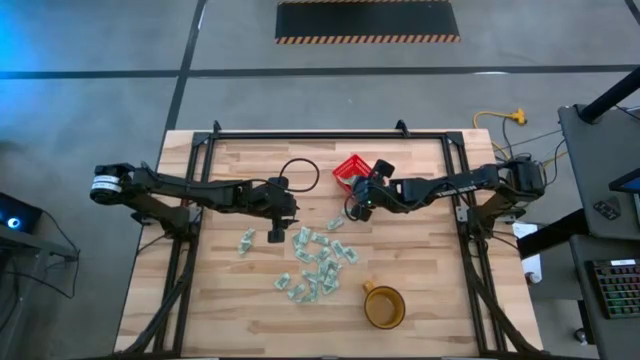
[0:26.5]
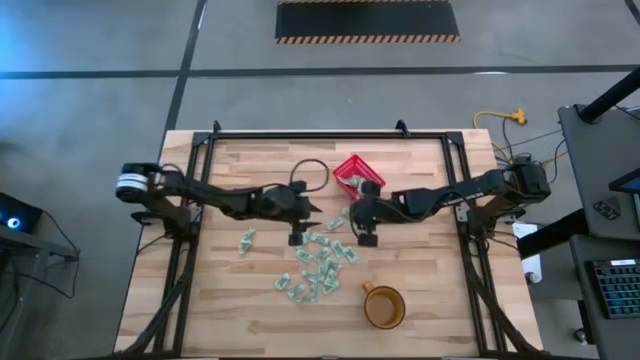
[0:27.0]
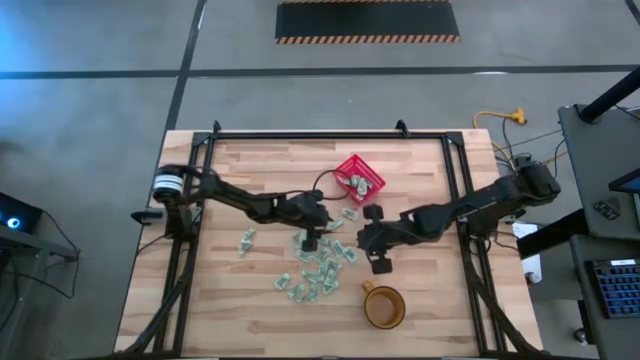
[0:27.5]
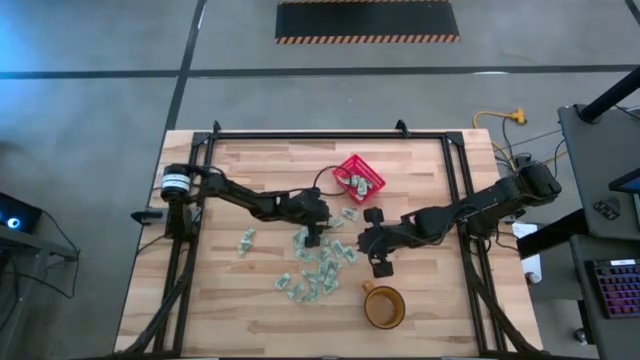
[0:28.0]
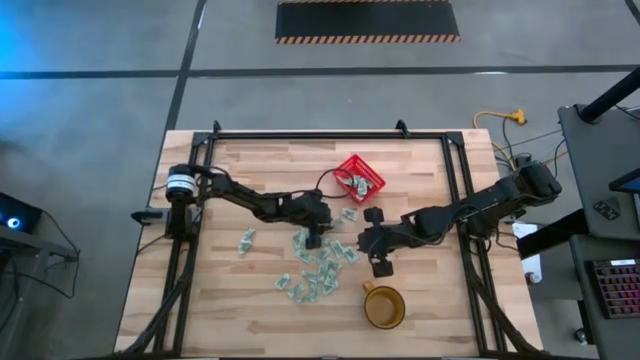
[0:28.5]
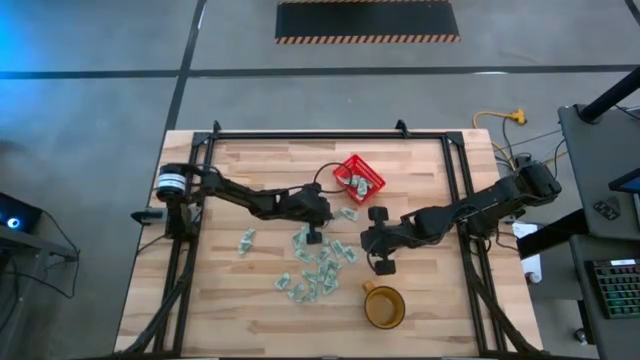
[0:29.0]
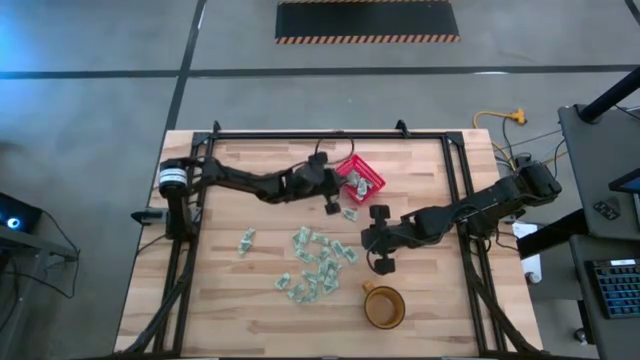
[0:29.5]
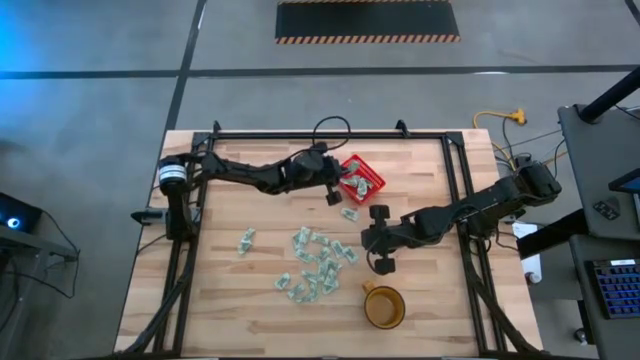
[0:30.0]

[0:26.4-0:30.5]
Task: Pick and place Stevia / Truvia into bins
Put the stevia packet into the red basket

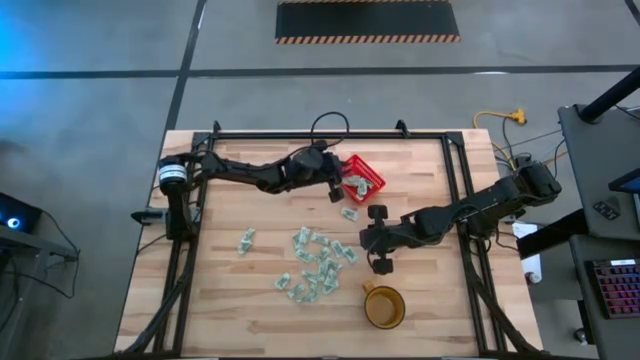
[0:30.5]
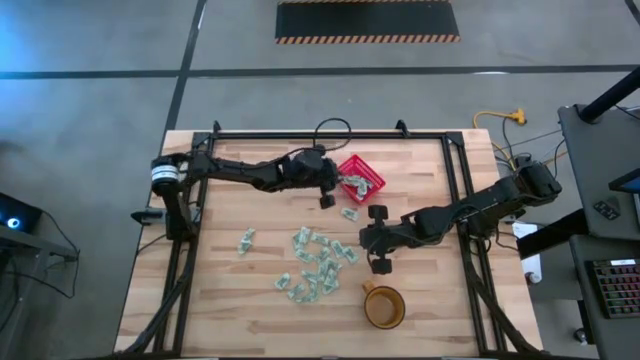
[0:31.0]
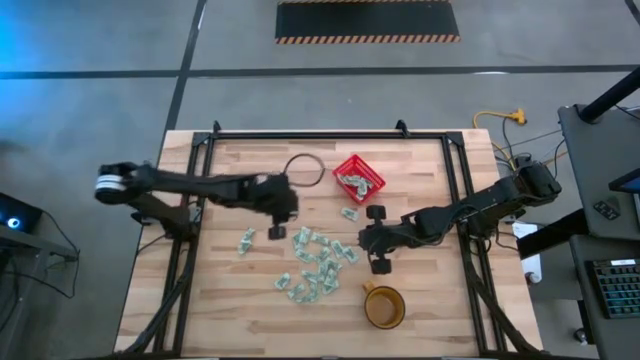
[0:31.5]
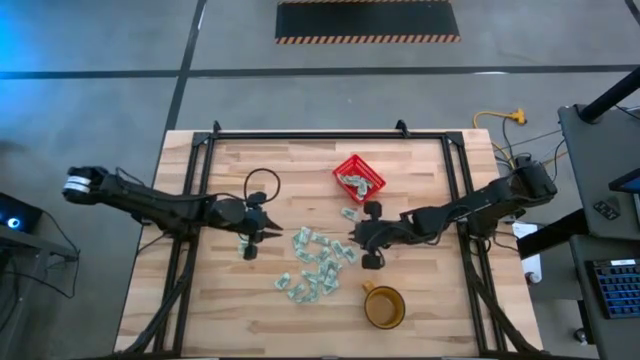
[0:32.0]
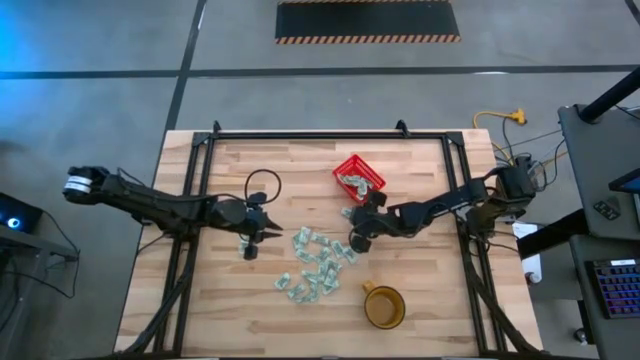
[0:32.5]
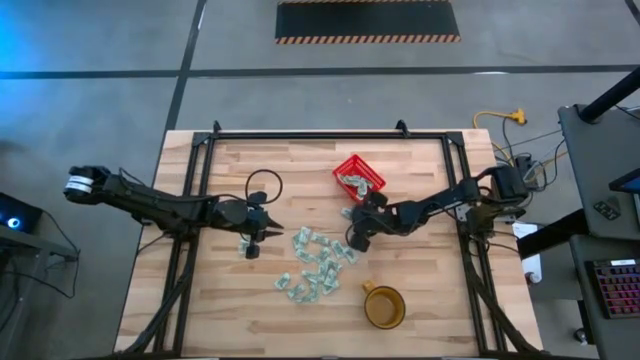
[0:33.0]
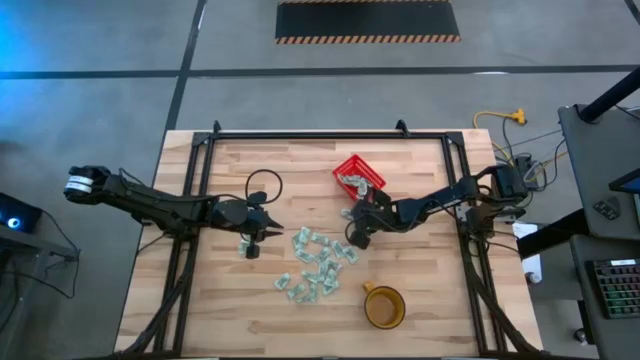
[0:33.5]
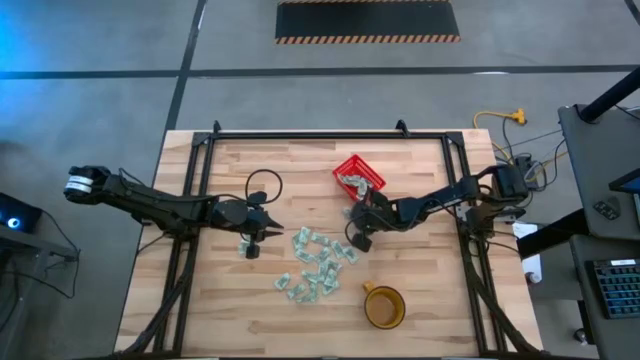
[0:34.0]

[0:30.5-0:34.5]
Put the stevia packet into the red basket

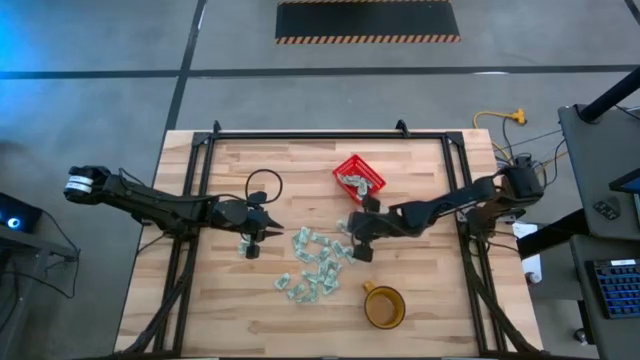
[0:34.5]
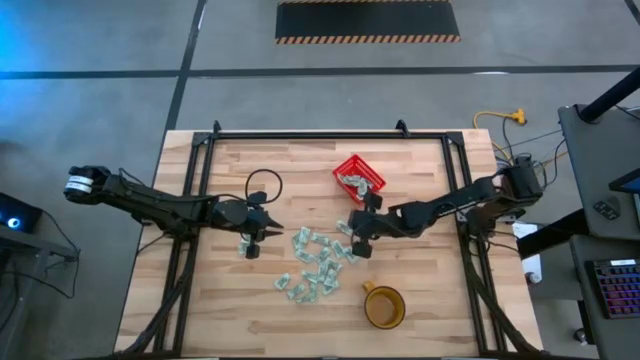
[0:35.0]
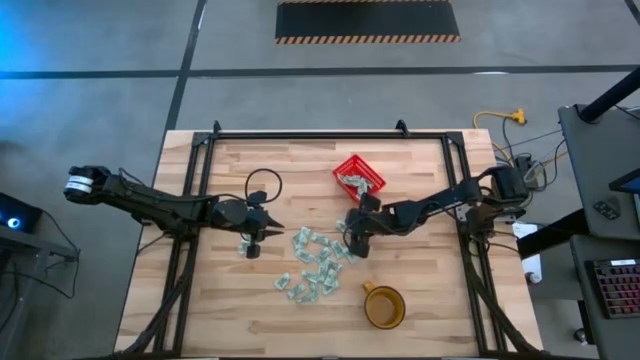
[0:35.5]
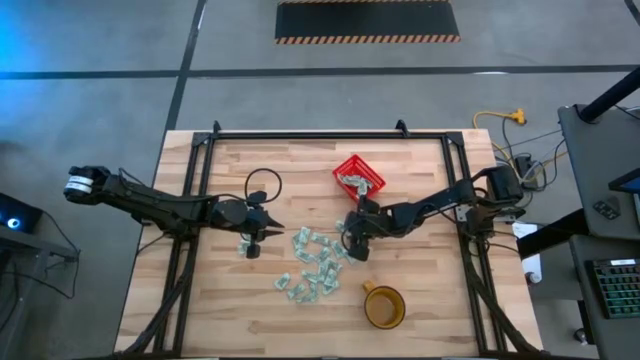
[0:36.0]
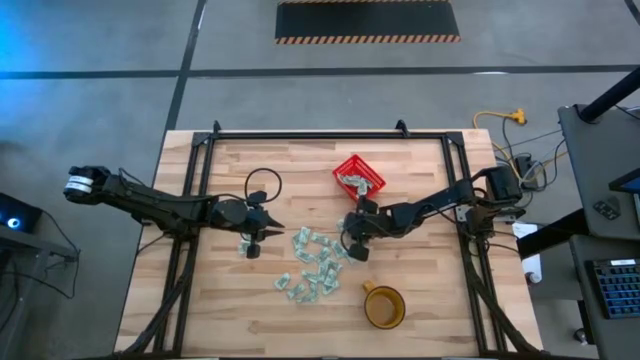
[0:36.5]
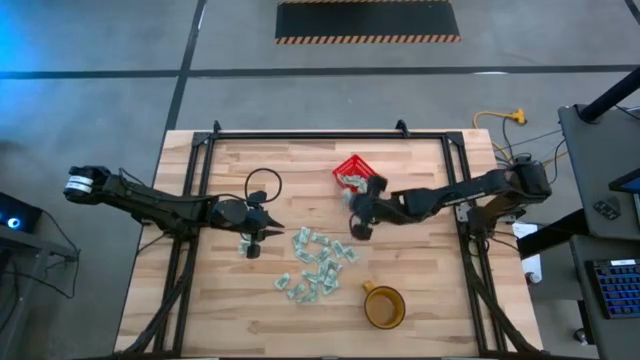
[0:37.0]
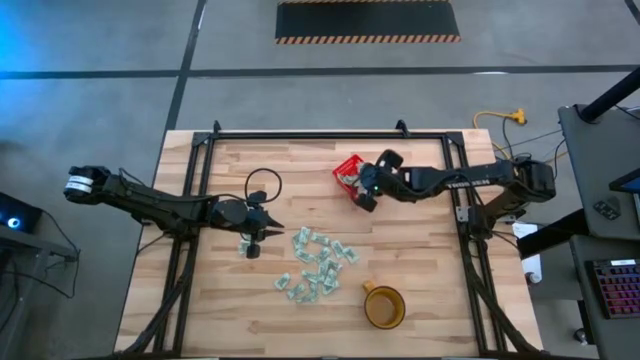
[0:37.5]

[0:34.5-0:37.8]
Put the stevia packet into the red basket

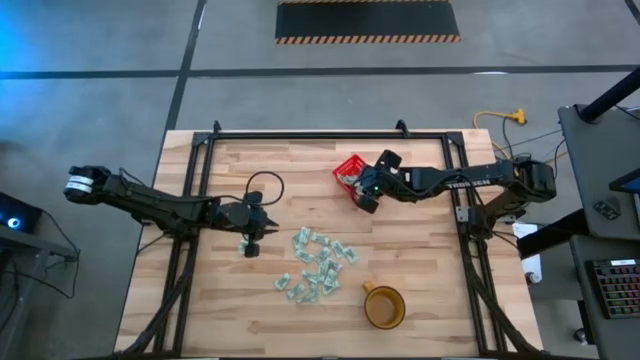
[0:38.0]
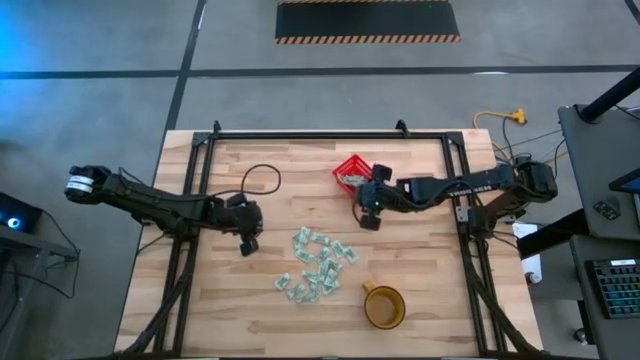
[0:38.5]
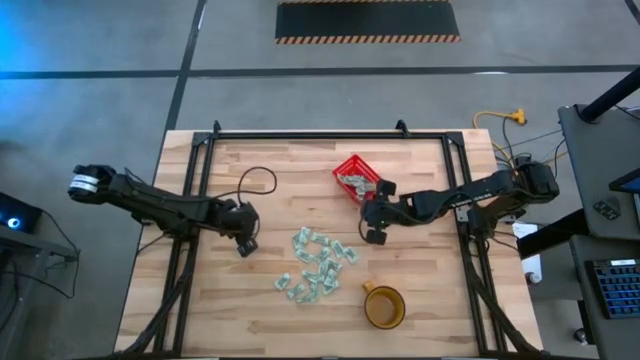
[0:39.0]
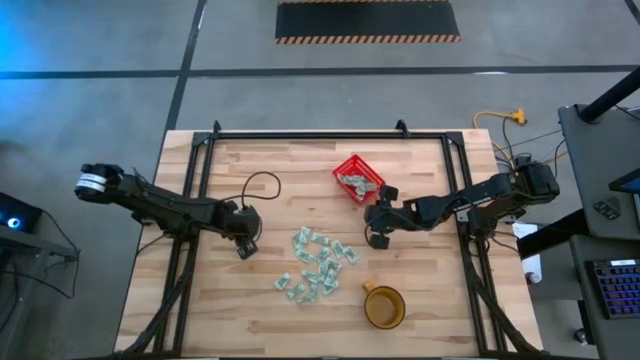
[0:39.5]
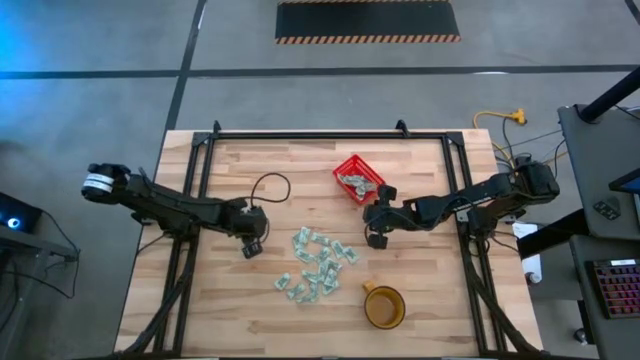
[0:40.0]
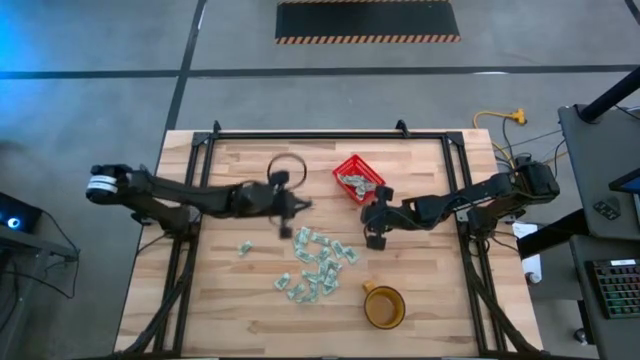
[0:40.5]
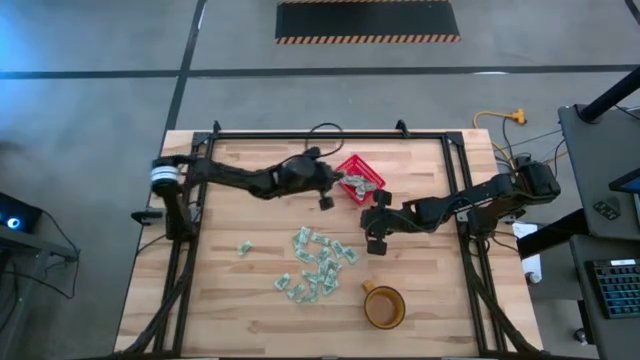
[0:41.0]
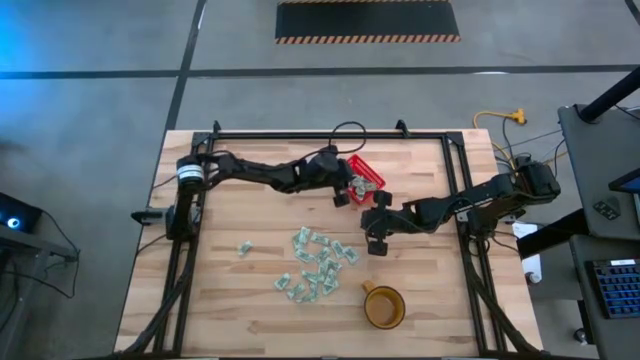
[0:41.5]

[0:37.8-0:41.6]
Put the stevia packet into the red basket

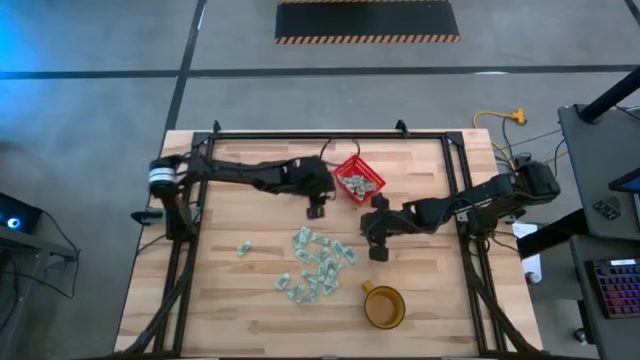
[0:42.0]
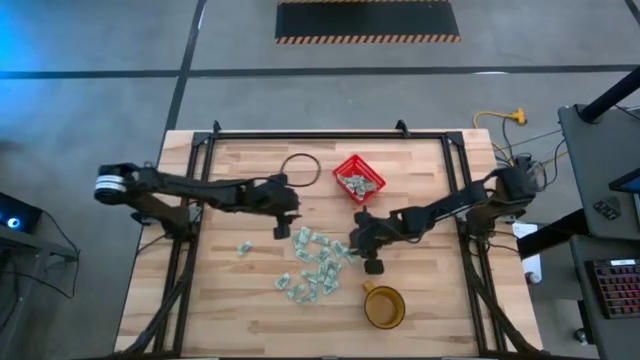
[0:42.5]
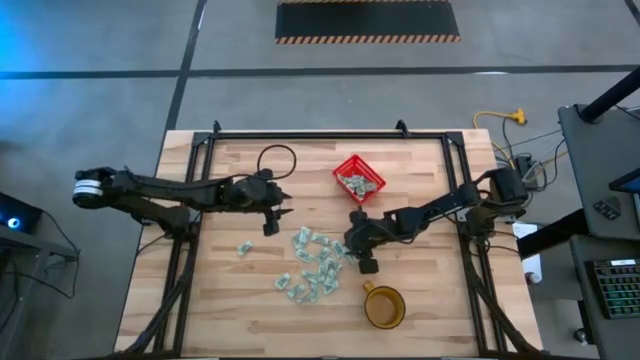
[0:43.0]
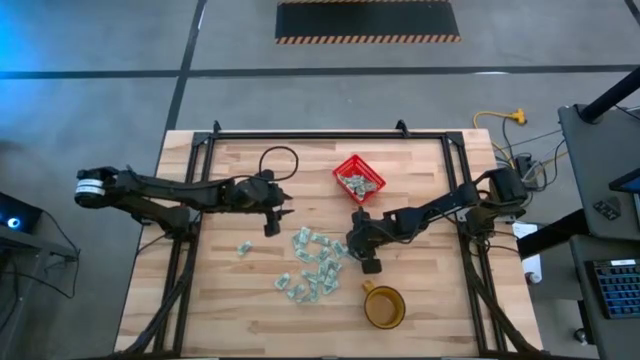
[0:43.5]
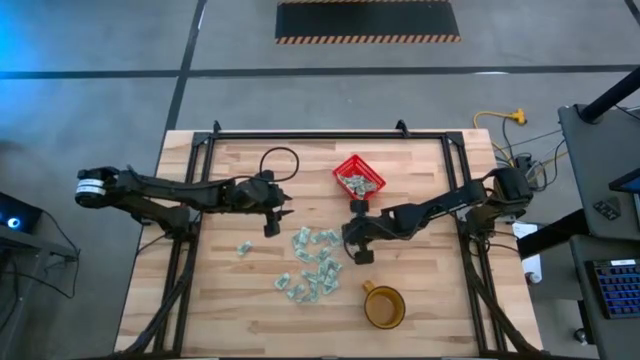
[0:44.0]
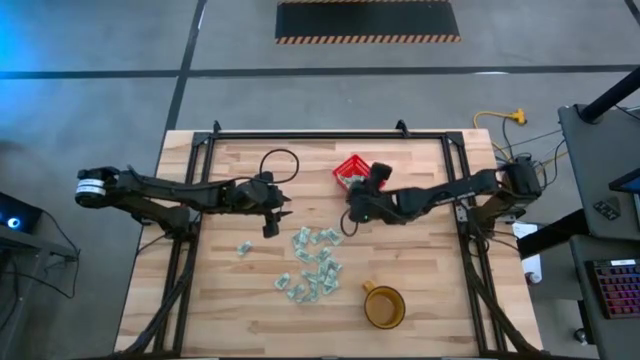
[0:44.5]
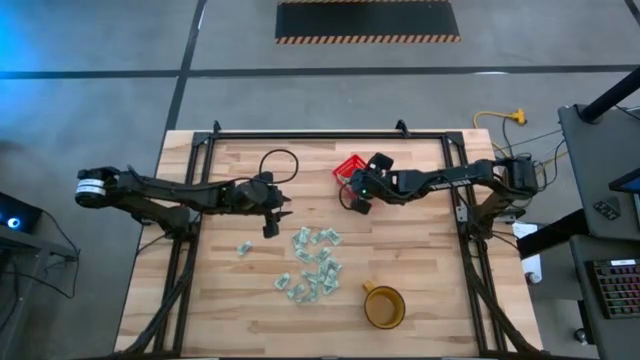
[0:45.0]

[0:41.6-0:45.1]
Put the stevia packet into the red basket

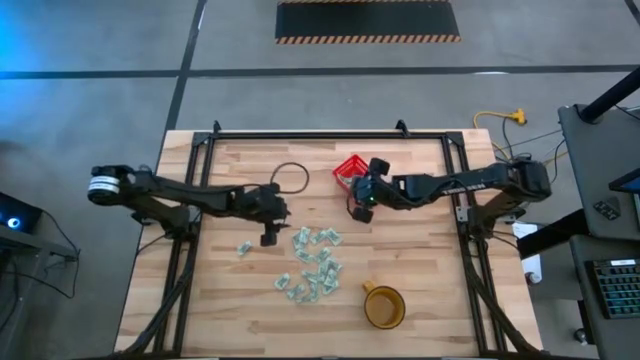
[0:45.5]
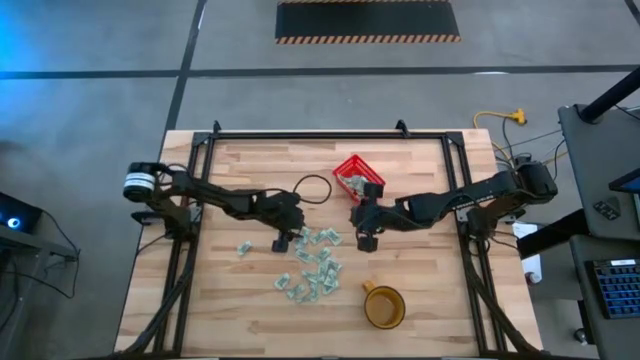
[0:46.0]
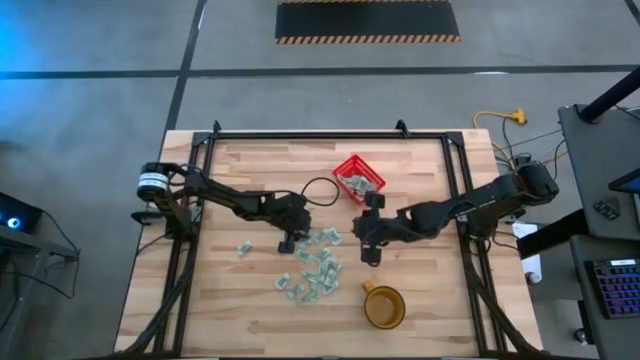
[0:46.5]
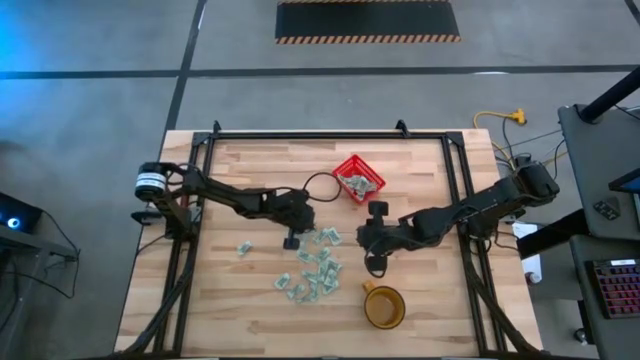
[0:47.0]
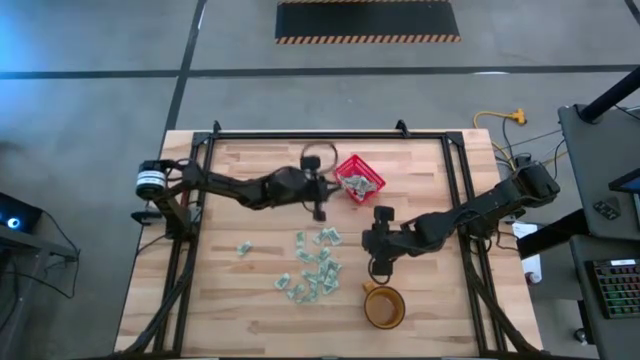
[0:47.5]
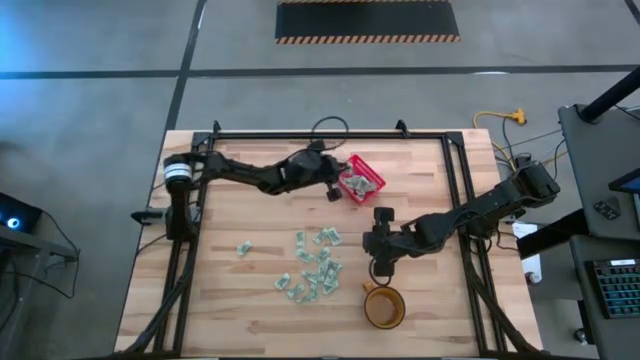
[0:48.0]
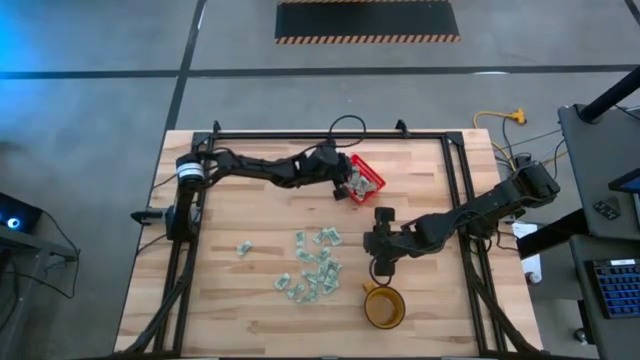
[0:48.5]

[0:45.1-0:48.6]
Put the stevia packet into the red basket
